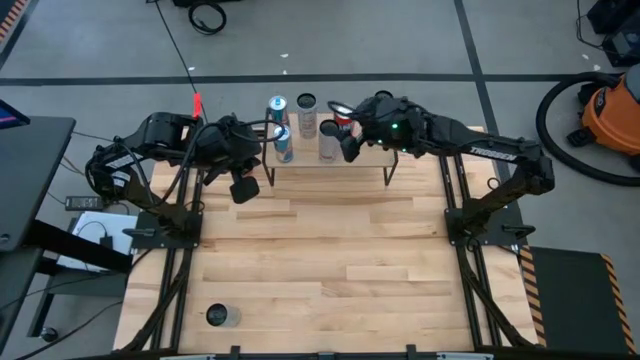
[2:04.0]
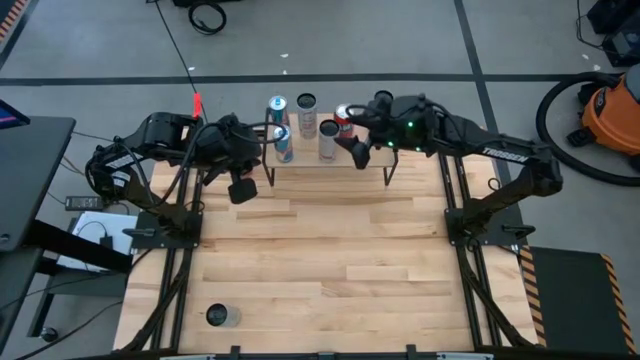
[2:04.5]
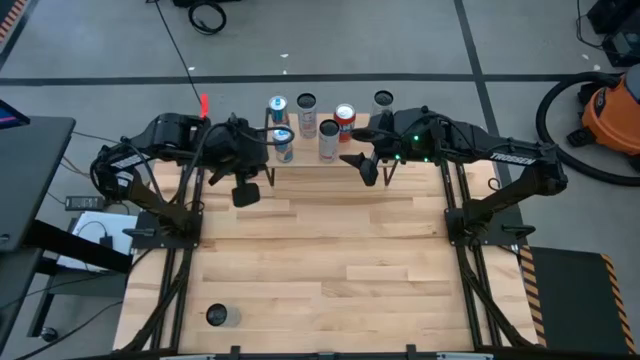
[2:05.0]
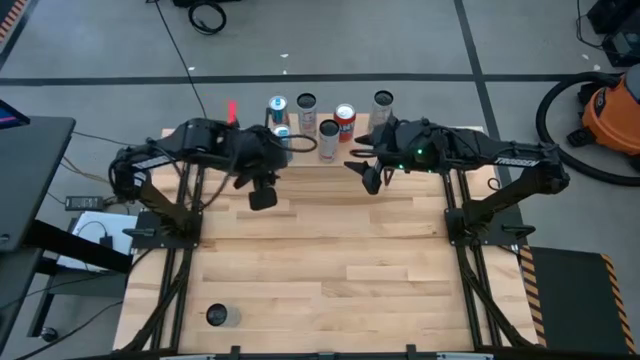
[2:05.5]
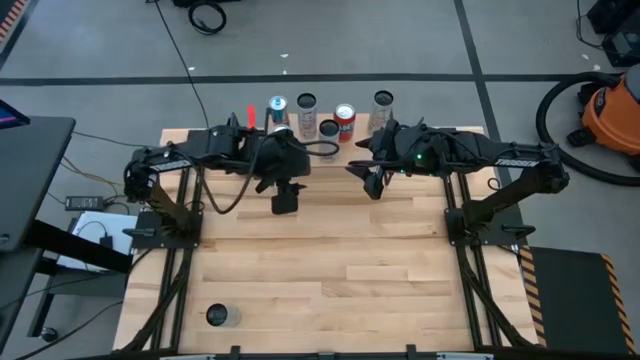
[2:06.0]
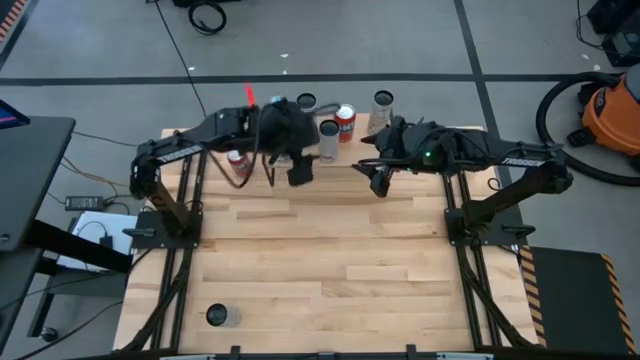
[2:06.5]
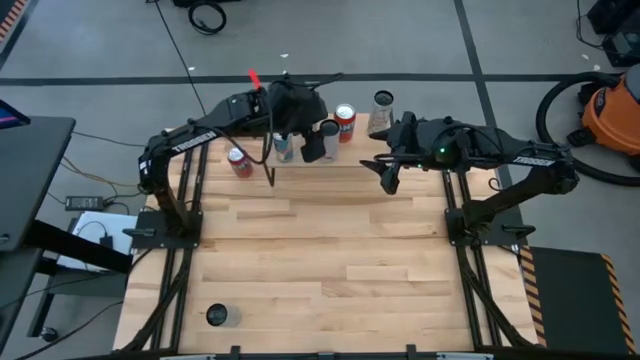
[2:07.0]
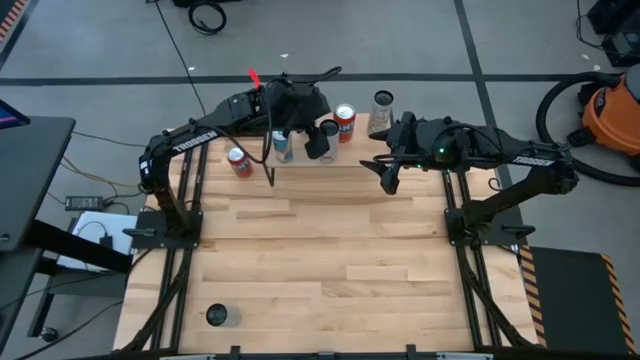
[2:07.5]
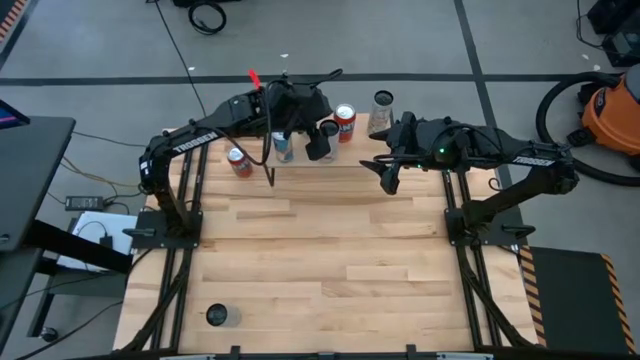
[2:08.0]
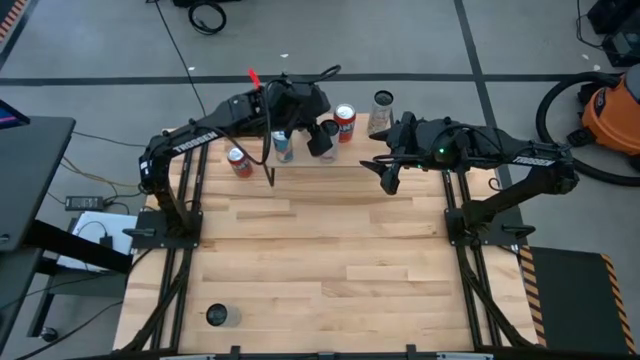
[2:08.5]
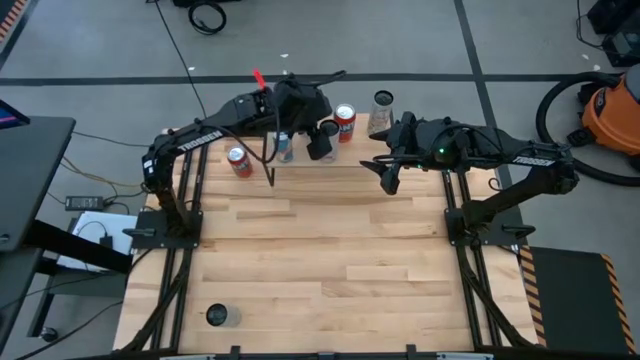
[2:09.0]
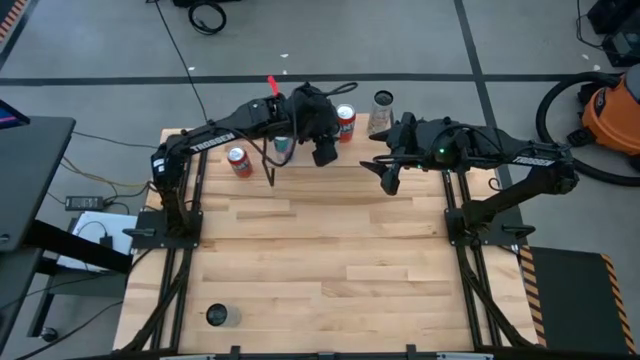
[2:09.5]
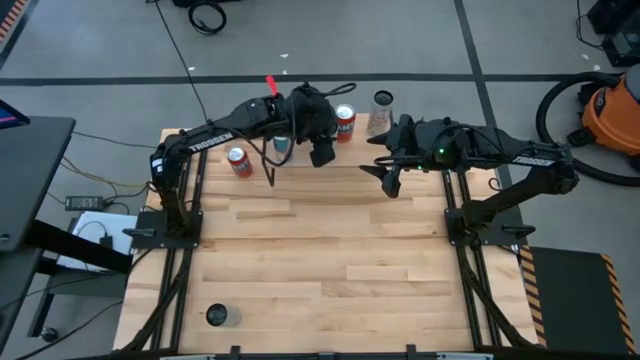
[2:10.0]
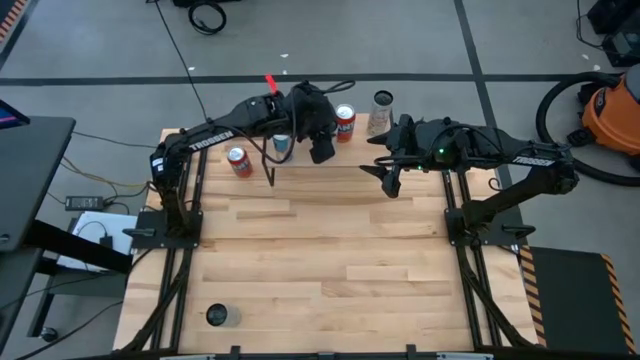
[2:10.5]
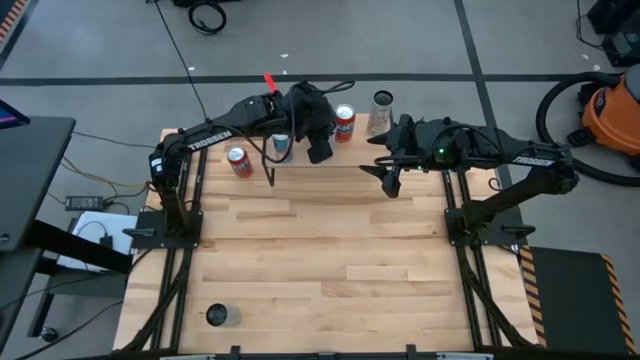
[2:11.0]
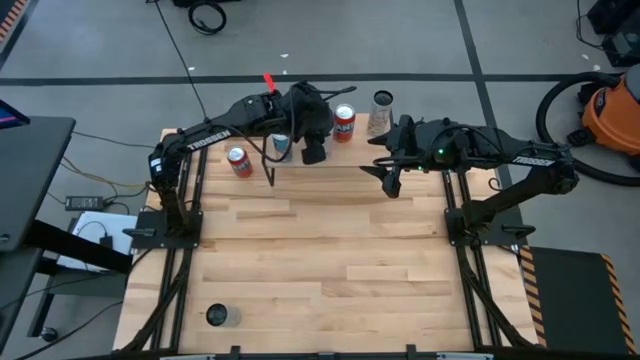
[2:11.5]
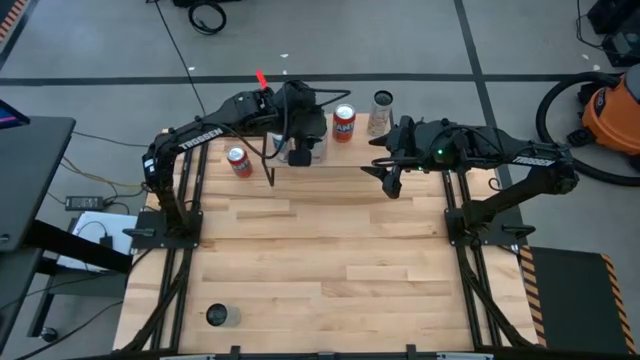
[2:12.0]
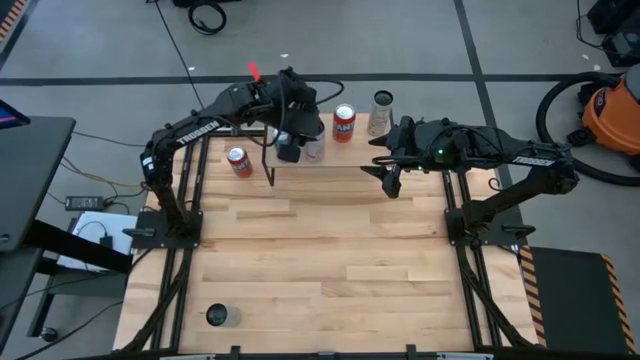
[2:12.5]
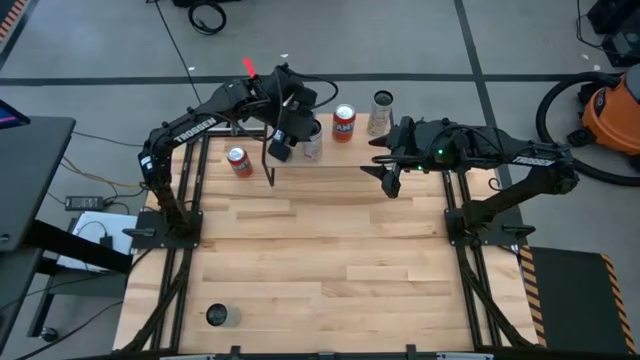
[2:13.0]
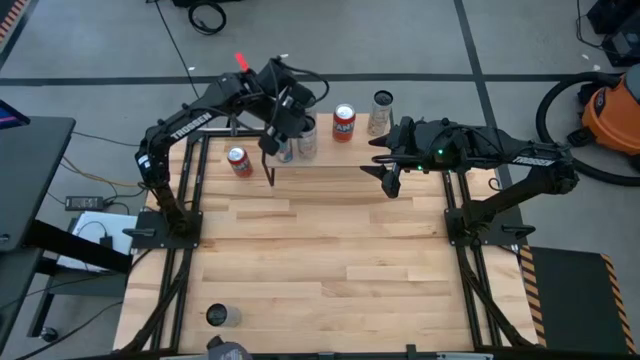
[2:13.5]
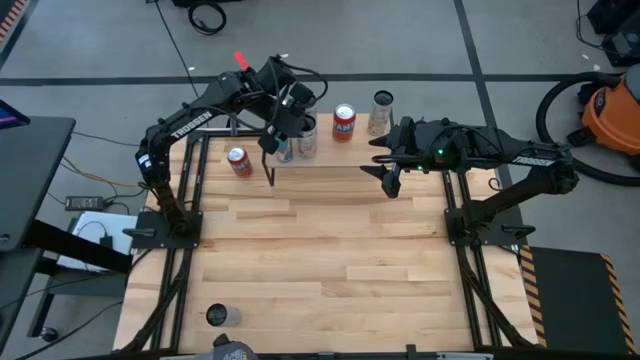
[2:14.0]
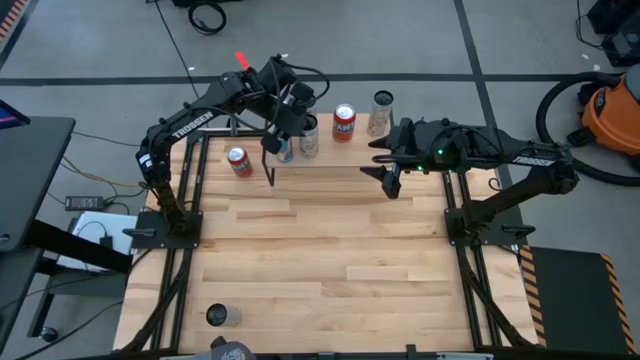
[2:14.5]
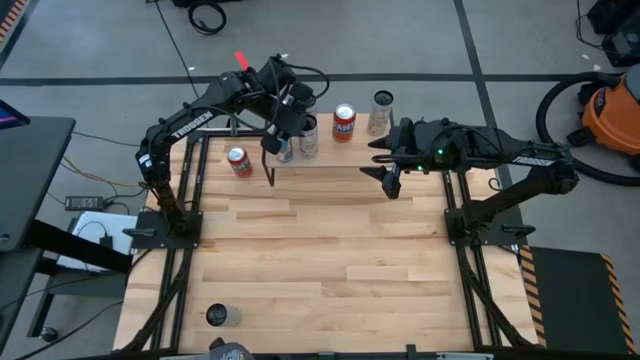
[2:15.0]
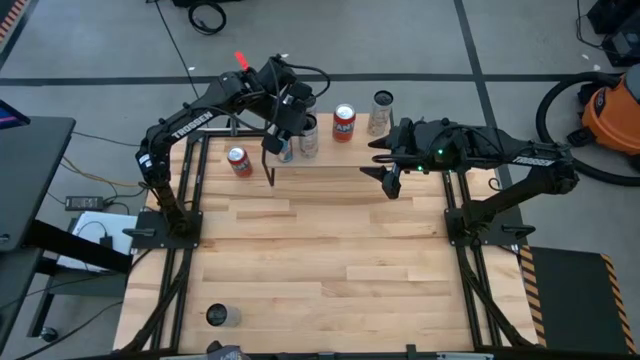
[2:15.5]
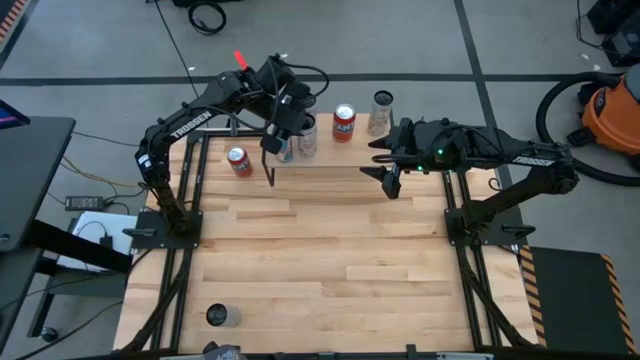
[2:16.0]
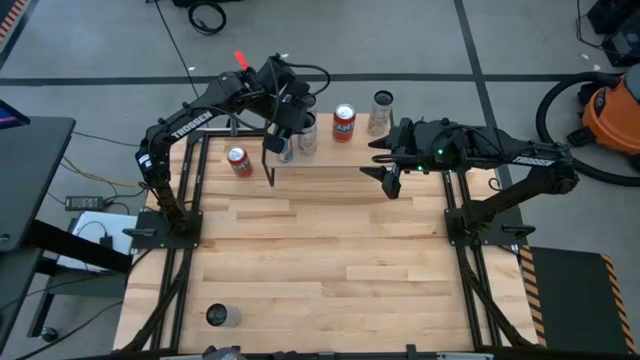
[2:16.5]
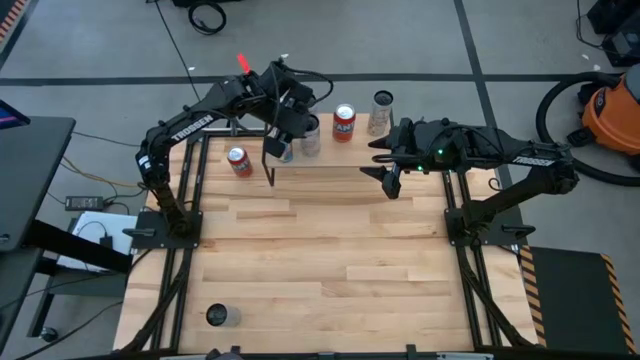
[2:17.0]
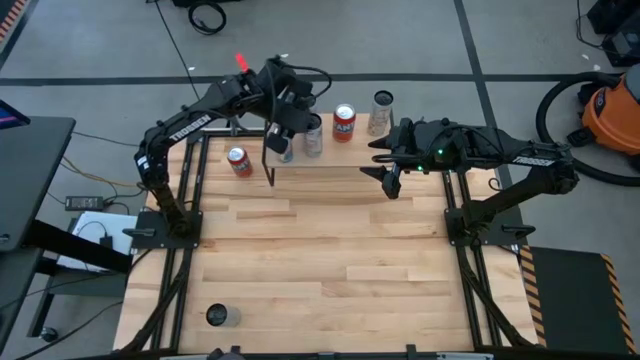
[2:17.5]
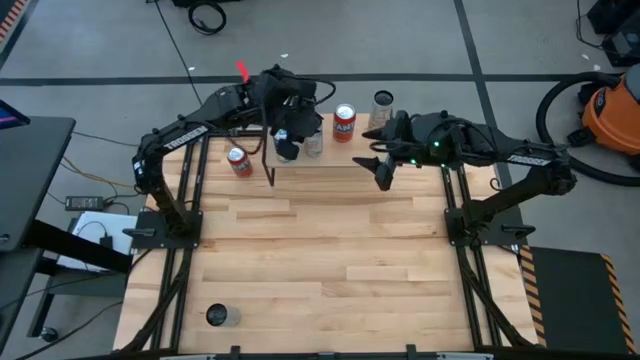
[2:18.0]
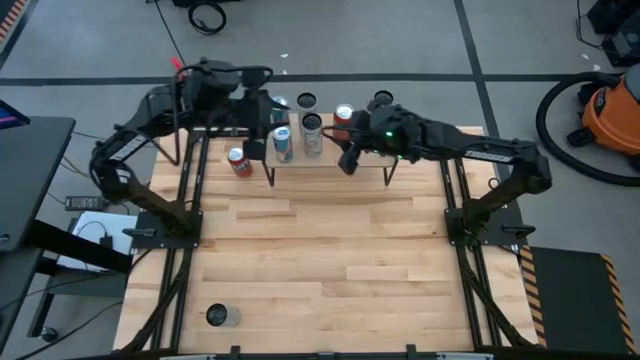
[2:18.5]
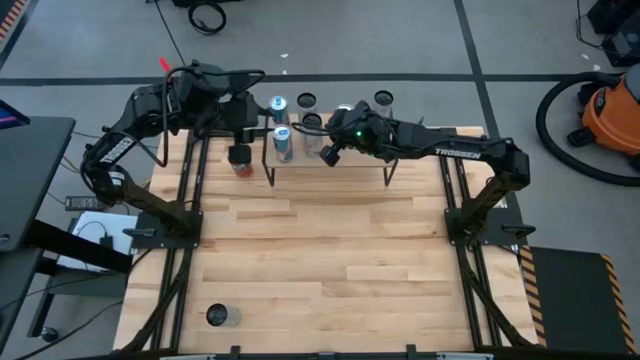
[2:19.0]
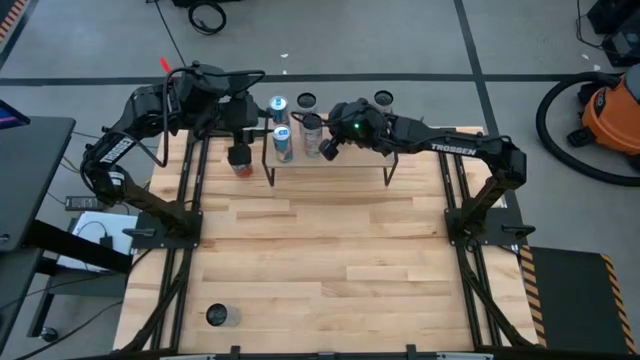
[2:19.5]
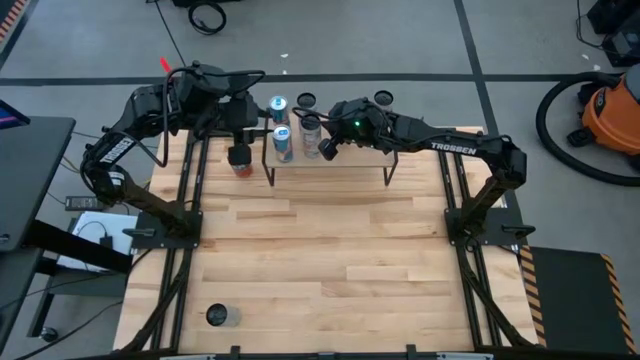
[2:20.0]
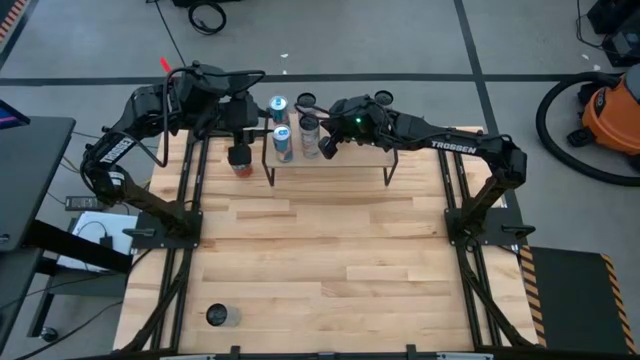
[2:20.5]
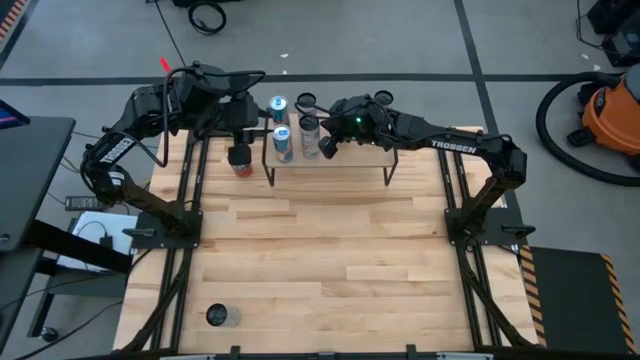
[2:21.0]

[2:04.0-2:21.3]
Task: Place canned beverage on shelf
Put the white pink soda can on the shelf aligned with the other white pink soda can

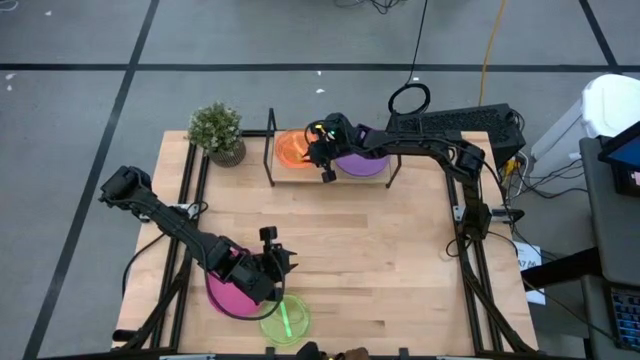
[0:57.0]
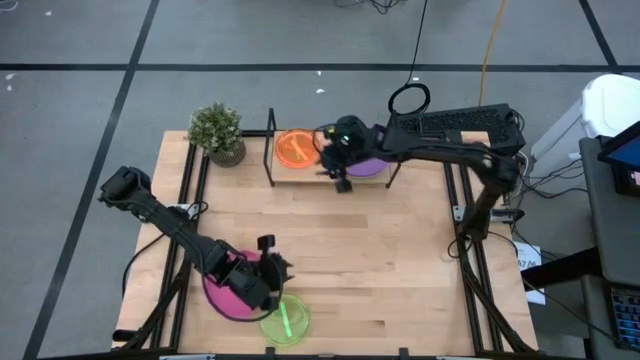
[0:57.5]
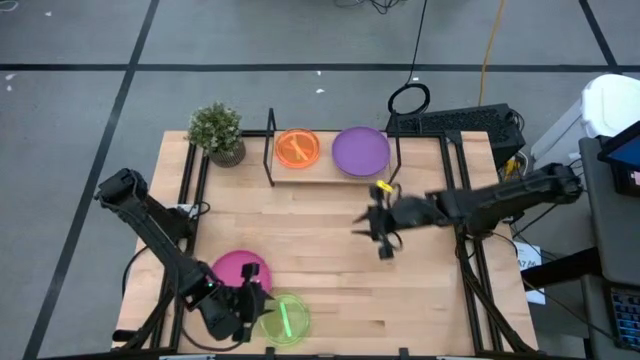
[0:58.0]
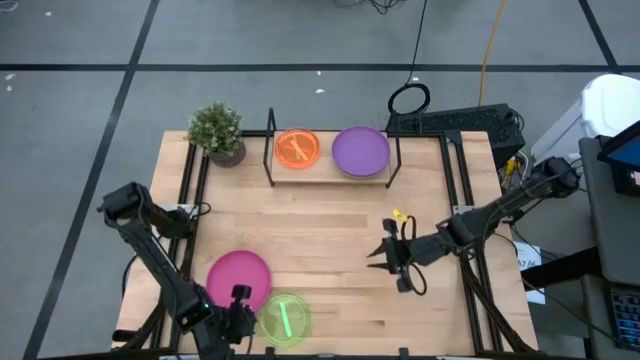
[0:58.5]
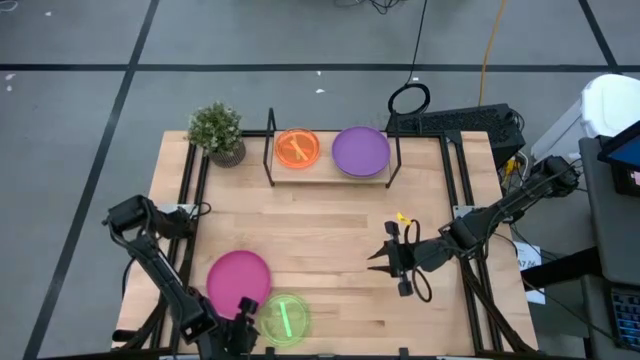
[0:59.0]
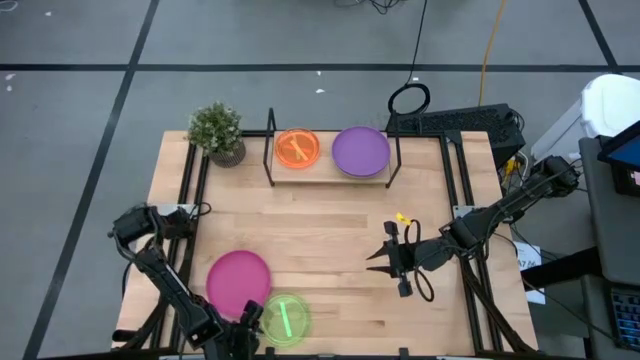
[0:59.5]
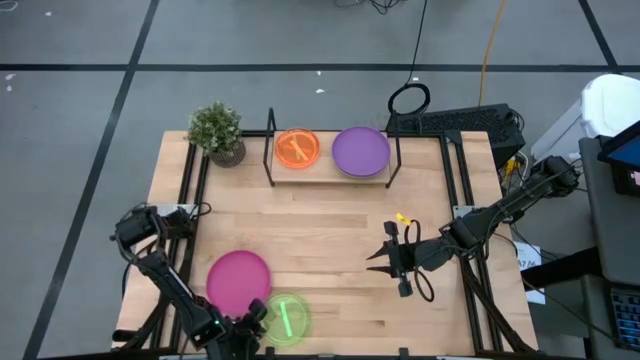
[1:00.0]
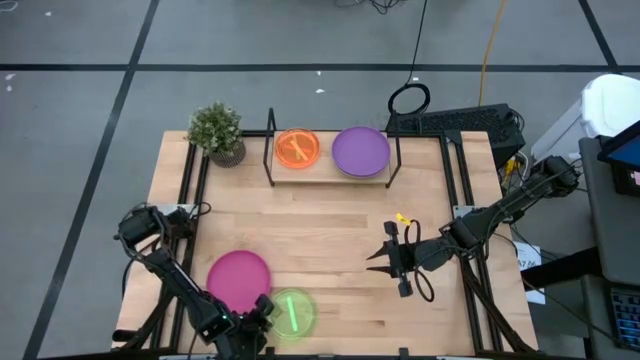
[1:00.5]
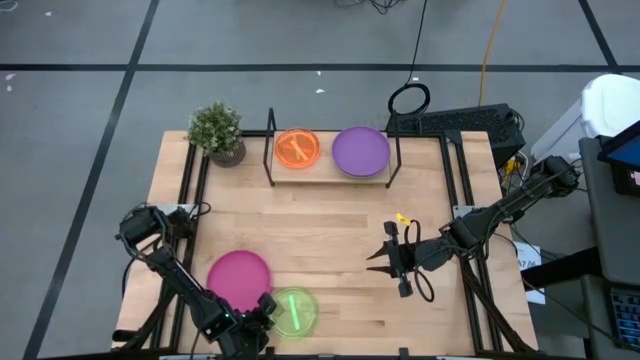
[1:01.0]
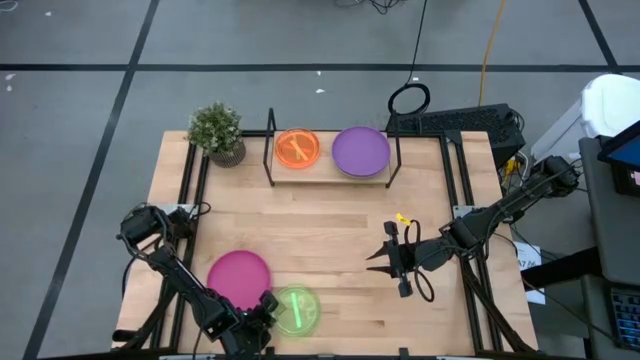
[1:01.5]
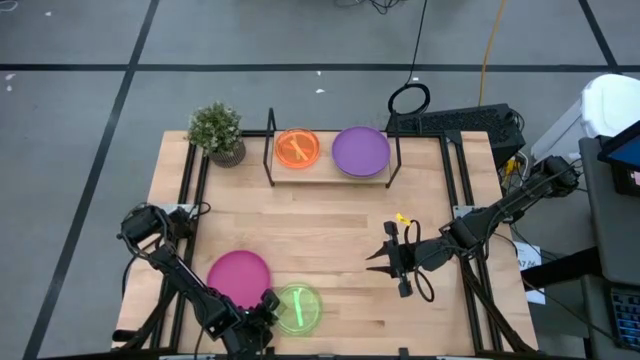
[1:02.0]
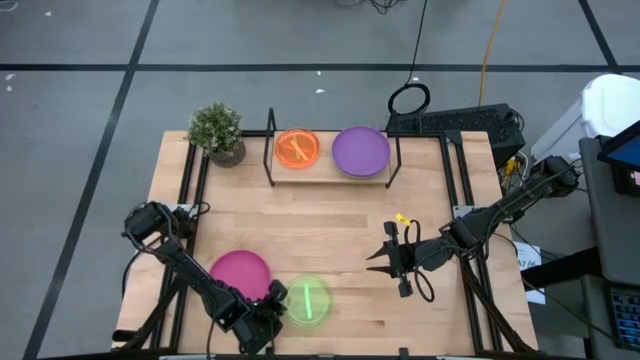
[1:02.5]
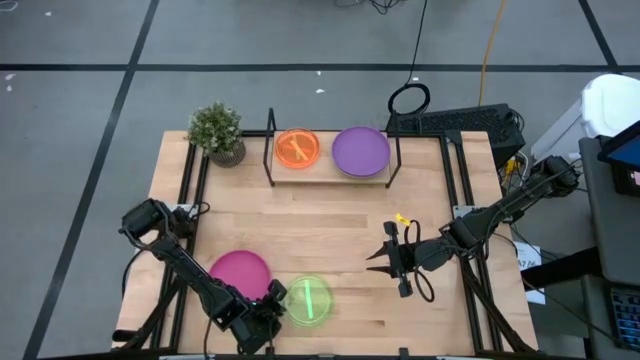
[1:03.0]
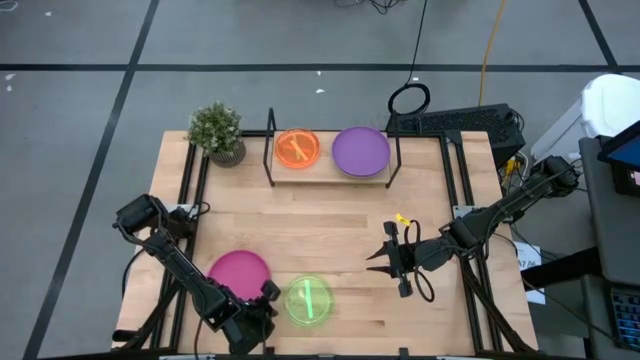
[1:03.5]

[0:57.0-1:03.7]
Task: Place and stack plates onto a shelf
Stack the transparent green plate on top of the transparent orange plate
